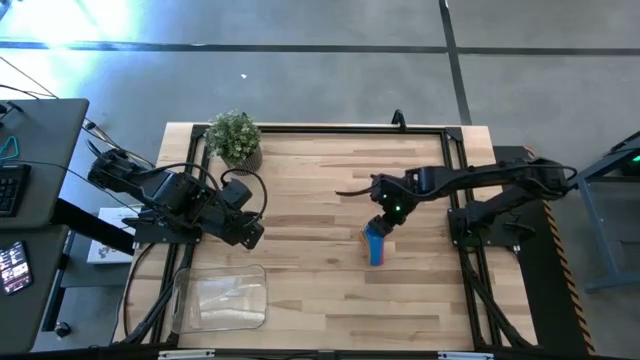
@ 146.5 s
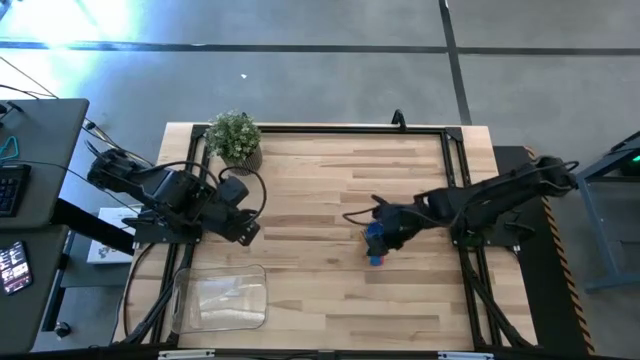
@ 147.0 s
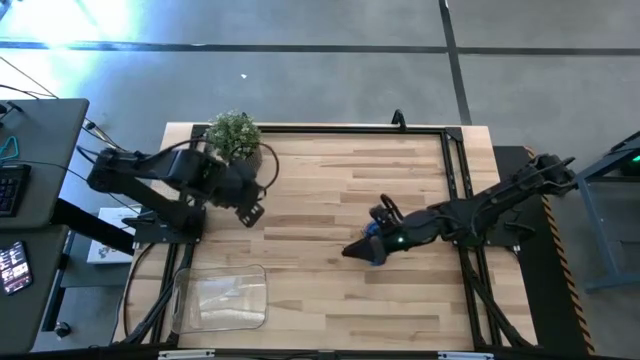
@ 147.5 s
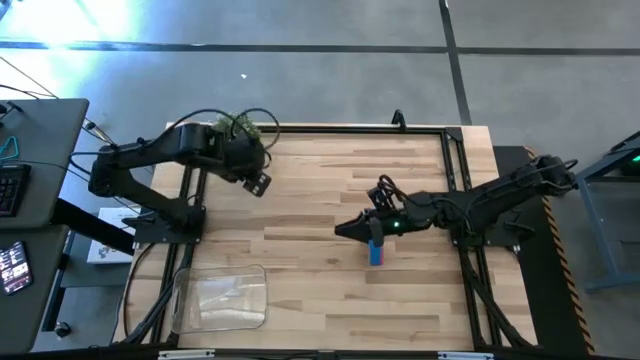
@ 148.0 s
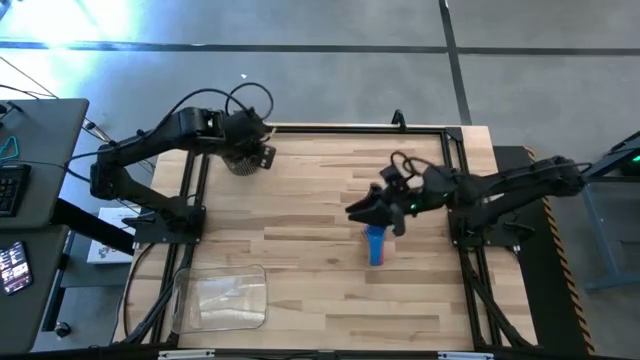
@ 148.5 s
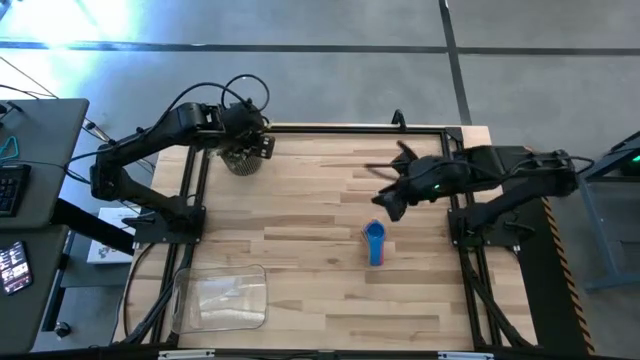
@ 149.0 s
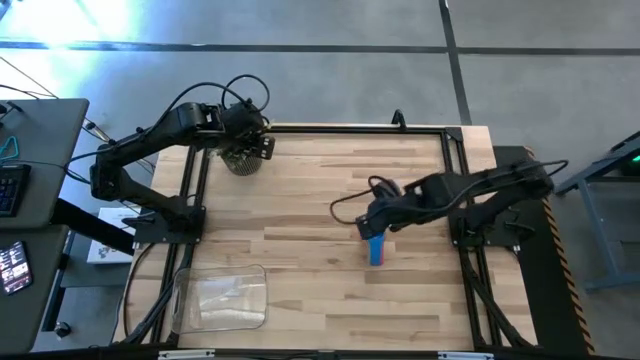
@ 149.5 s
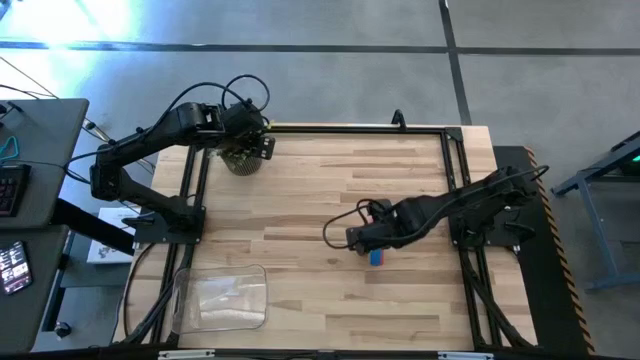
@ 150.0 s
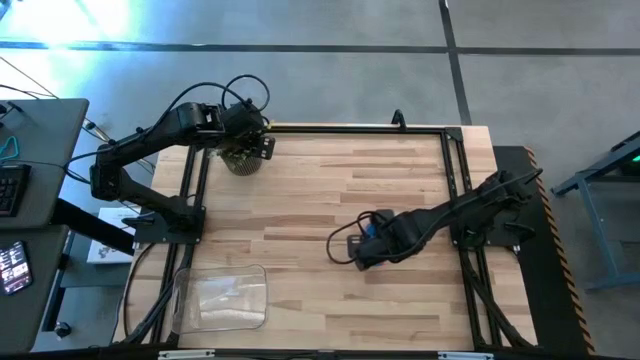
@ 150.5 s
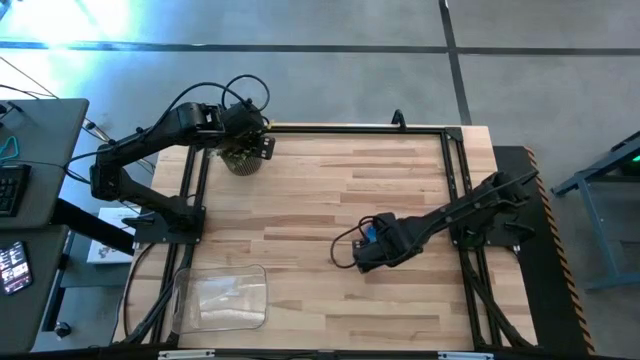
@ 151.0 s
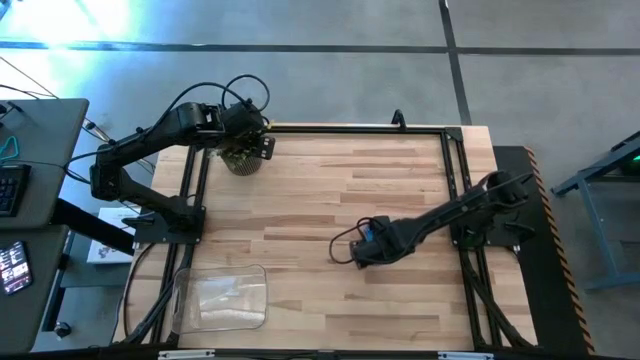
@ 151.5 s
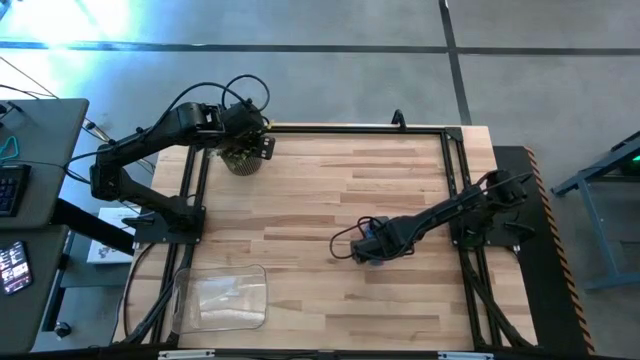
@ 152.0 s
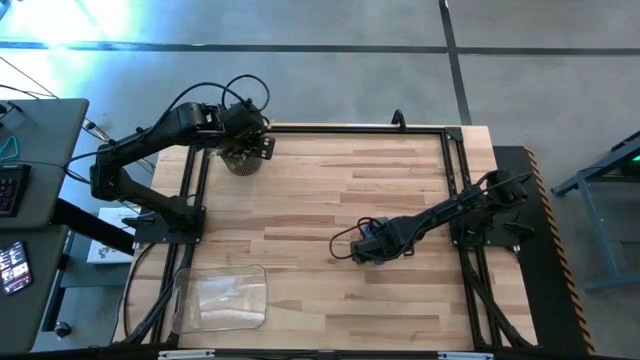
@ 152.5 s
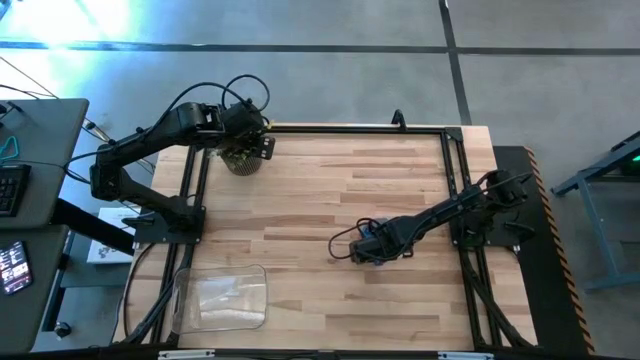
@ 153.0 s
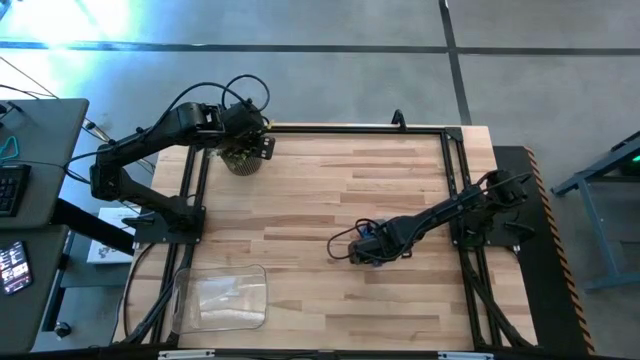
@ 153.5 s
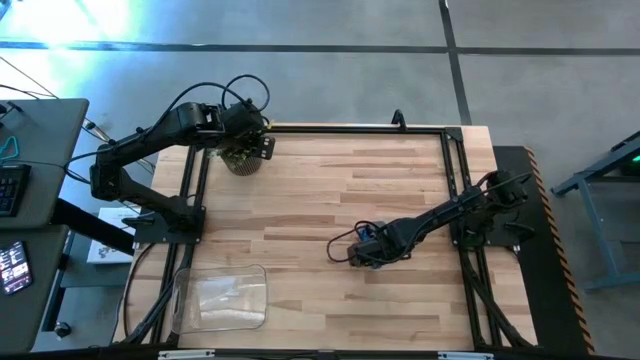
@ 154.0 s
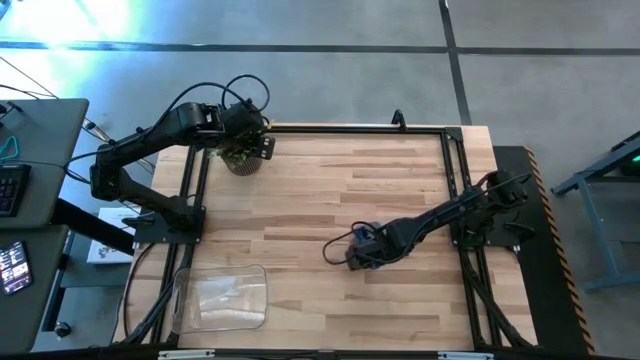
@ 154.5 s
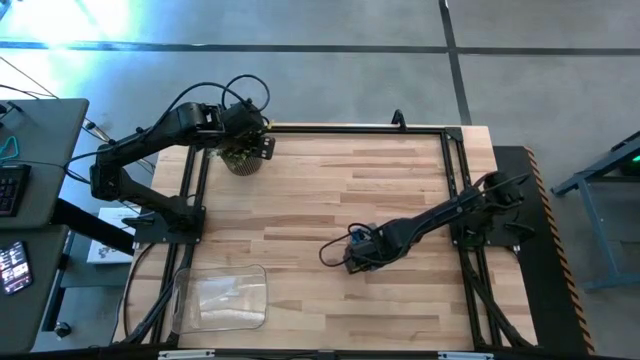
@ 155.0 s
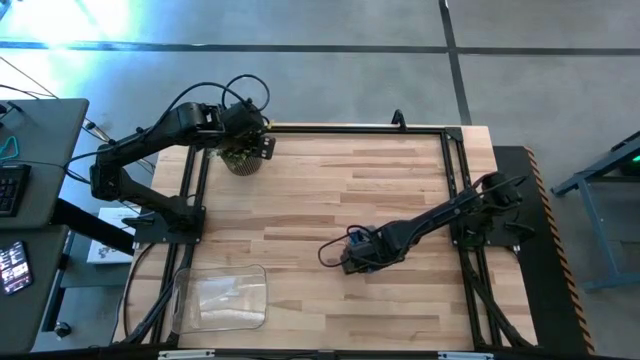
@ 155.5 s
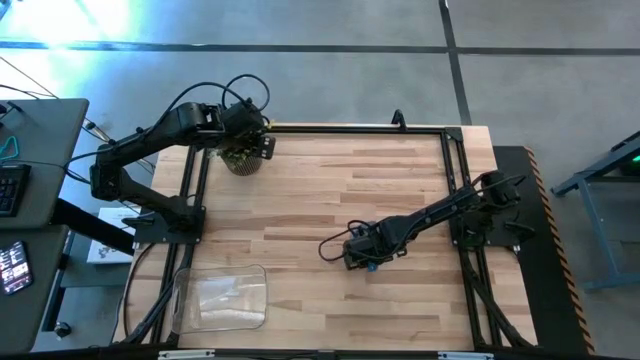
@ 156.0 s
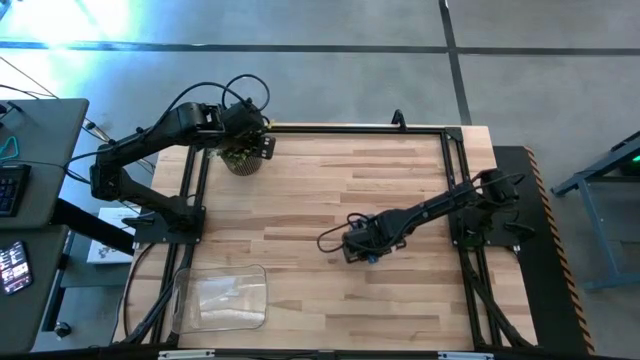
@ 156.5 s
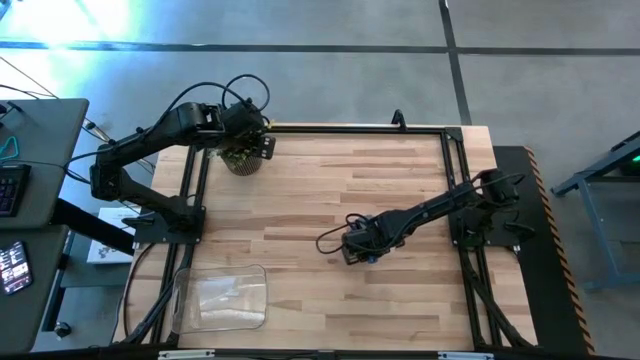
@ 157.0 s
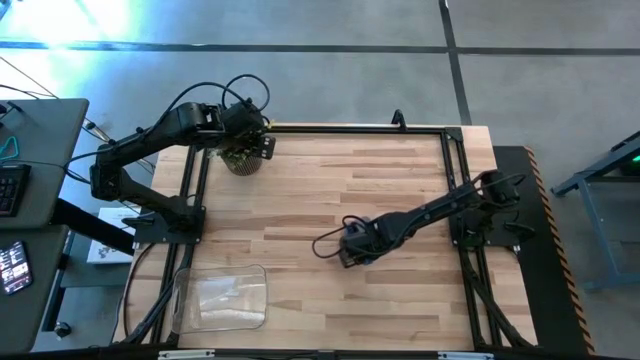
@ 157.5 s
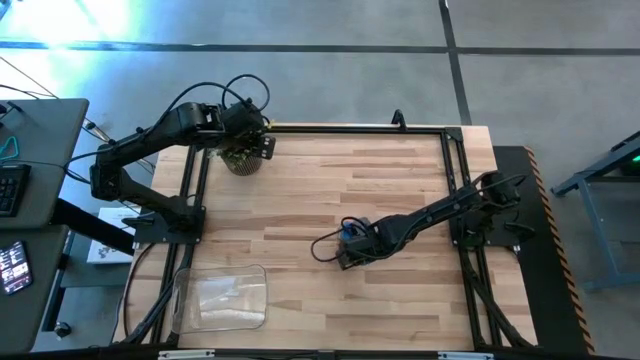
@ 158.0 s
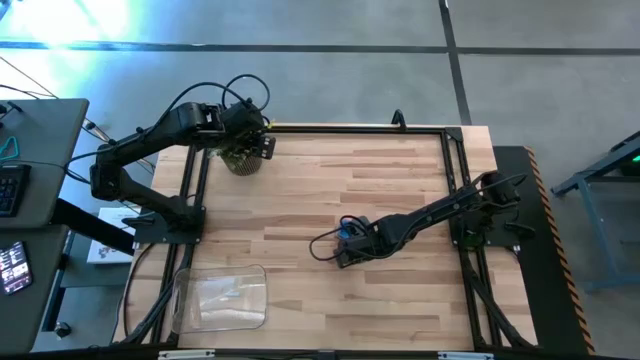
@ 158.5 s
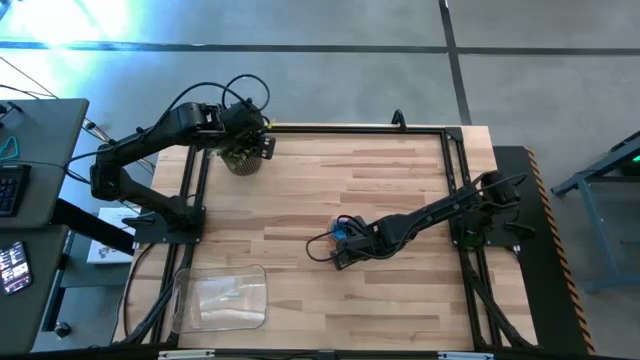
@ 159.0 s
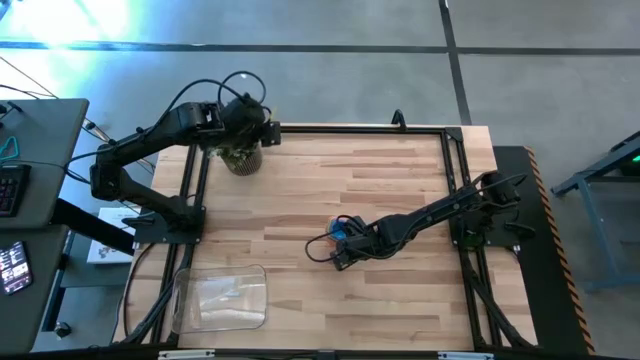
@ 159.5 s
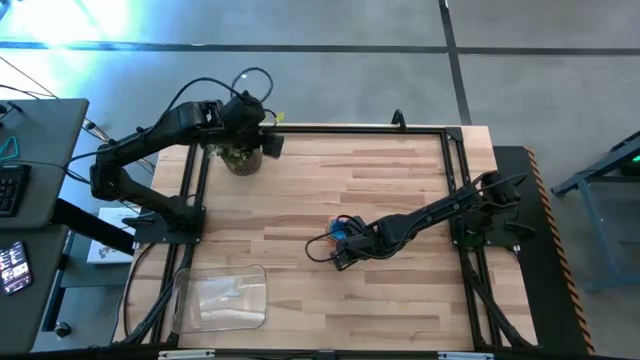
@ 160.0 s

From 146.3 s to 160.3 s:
Task: Nest measuring cups in basket
Put the nested measuring cups into the transparent bin

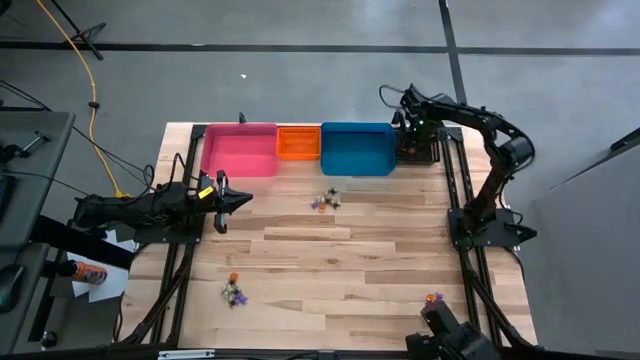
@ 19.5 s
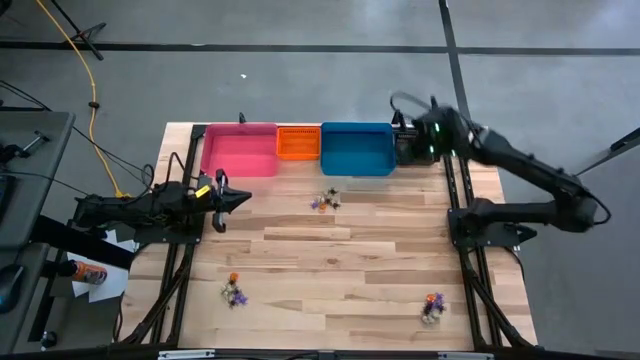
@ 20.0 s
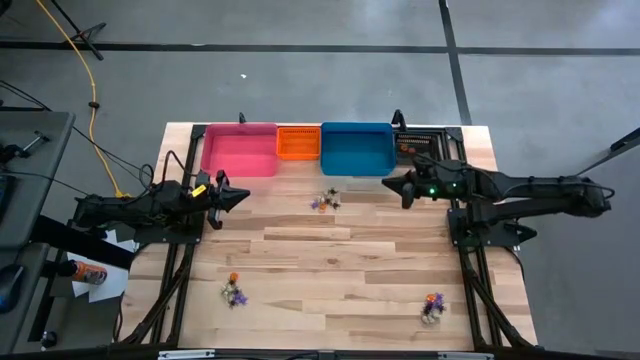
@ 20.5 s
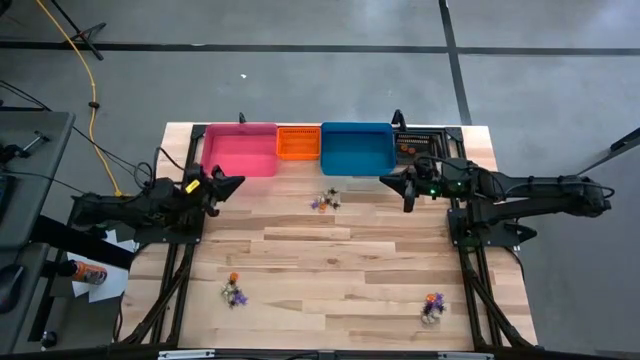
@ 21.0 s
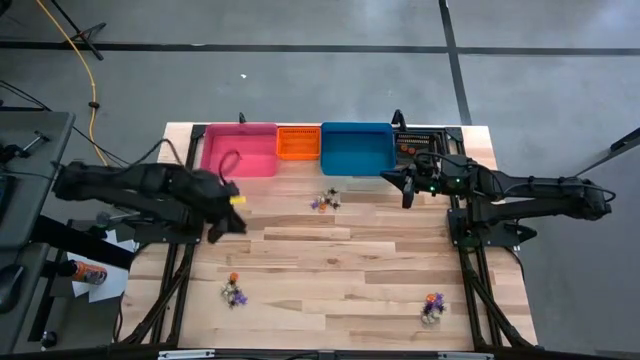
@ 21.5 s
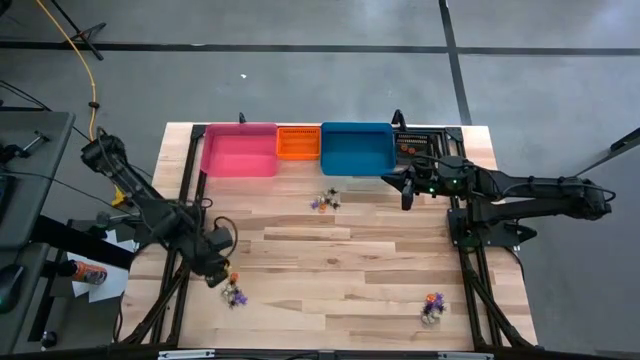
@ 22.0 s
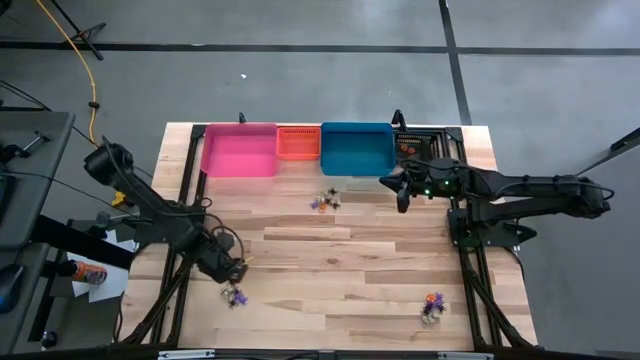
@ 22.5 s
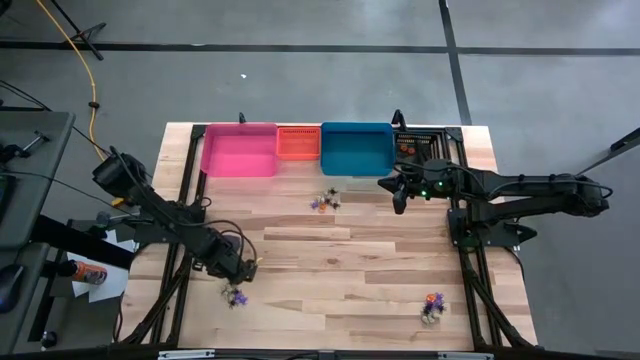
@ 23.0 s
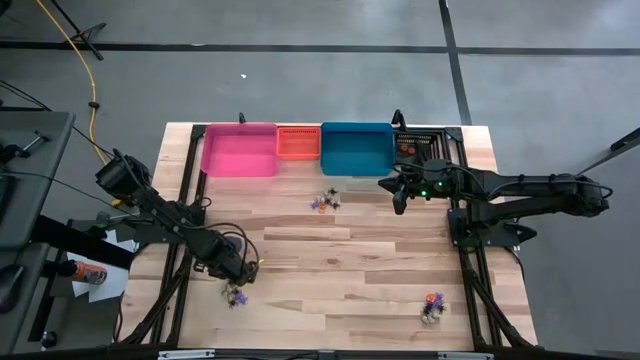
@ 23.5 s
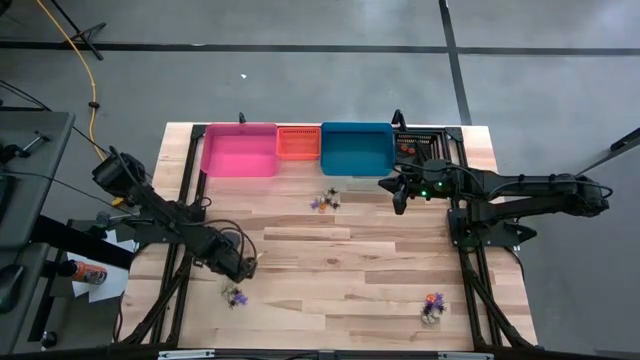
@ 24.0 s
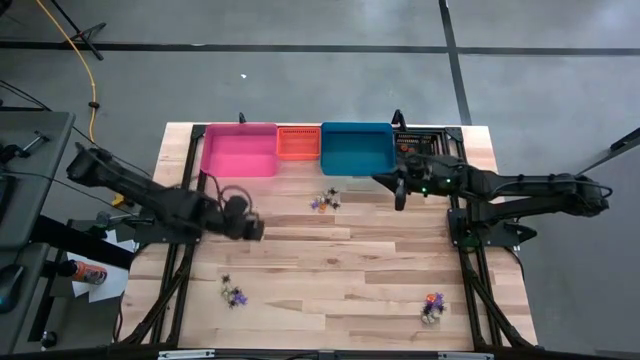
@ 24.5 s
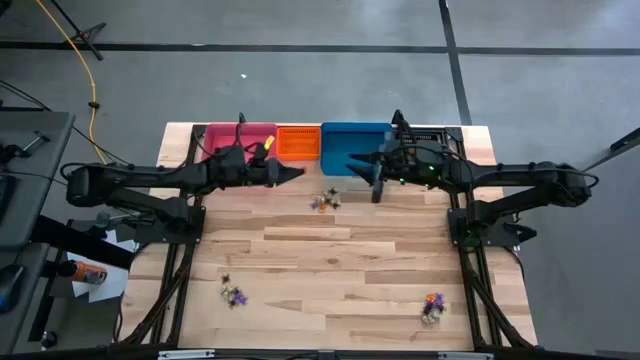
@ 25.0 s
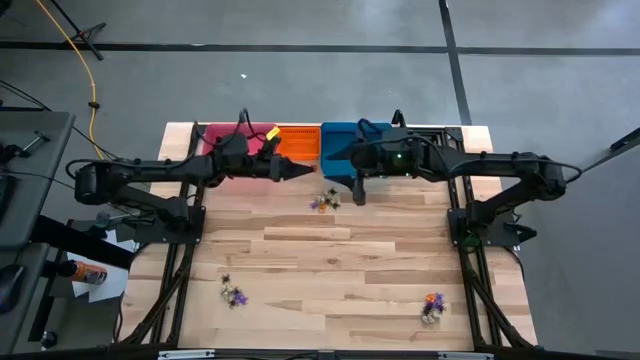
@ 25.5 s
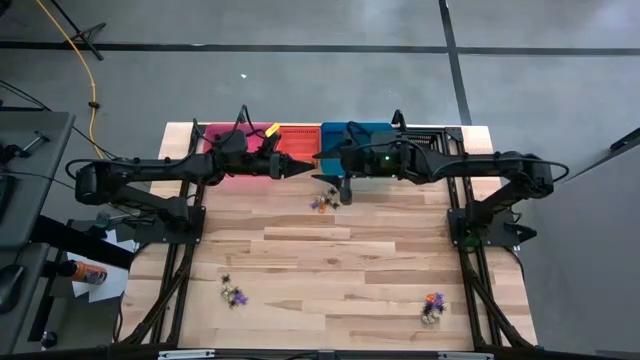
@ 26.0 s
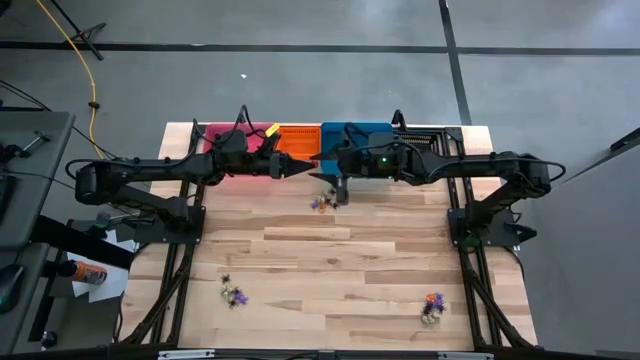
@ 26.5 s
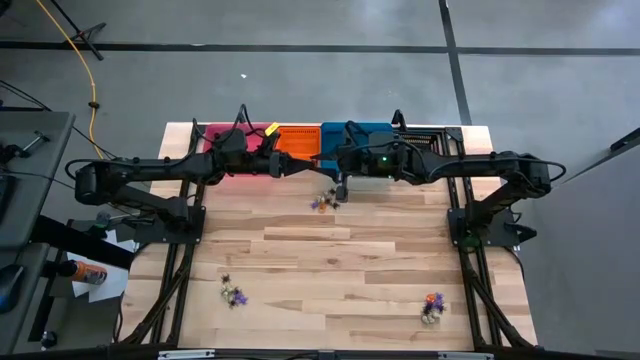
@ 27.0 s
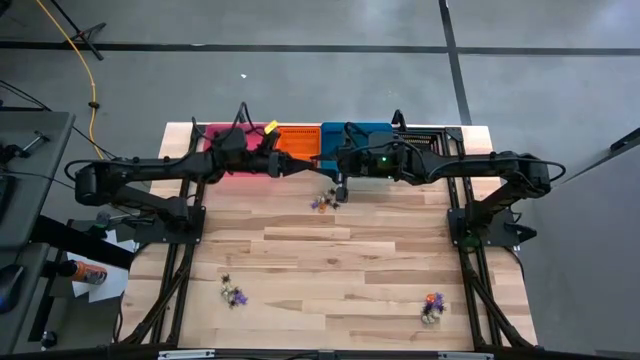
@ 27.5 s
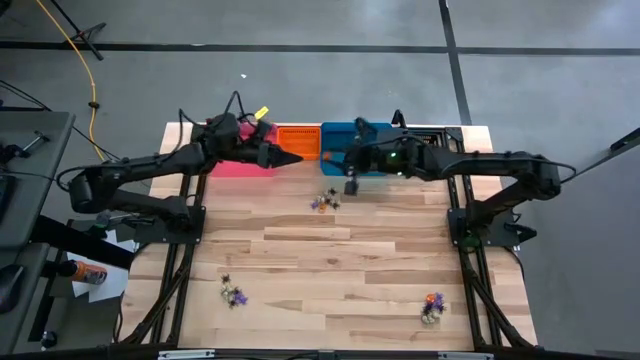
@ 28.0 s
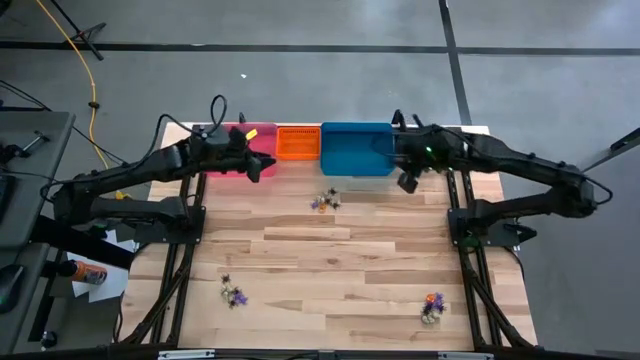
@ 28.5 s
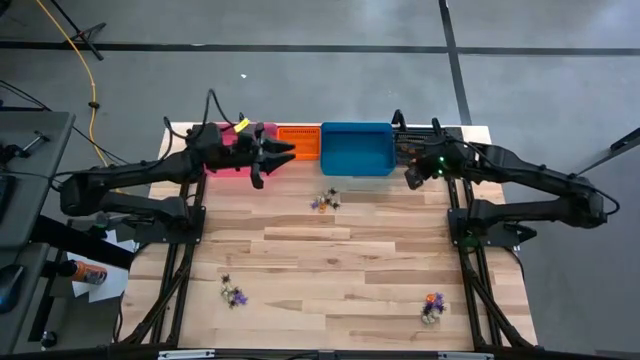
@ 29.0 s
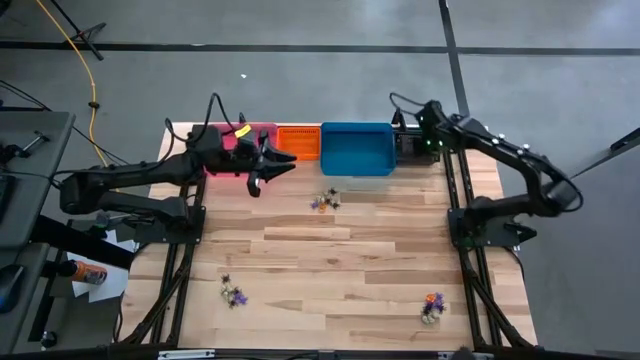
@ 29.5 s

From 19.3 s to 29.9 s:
Task: Sort Halloween decoration
Put the orange pumpkin toy into the black bin
